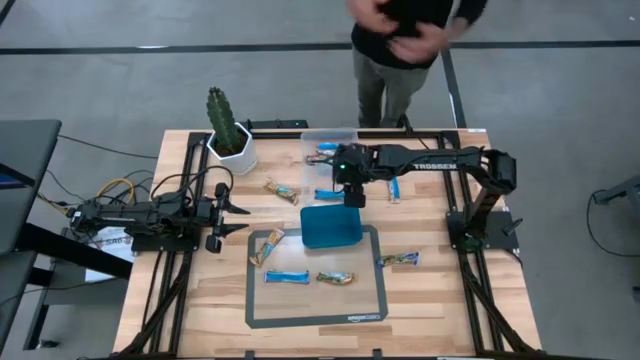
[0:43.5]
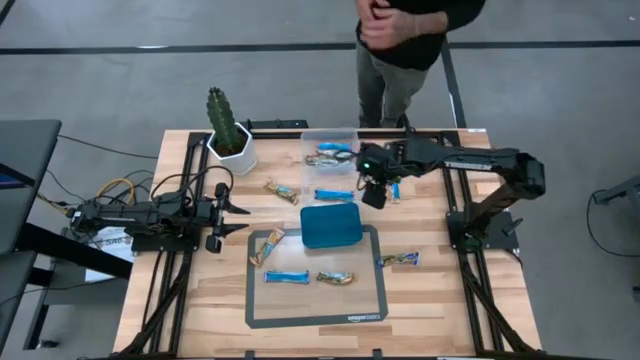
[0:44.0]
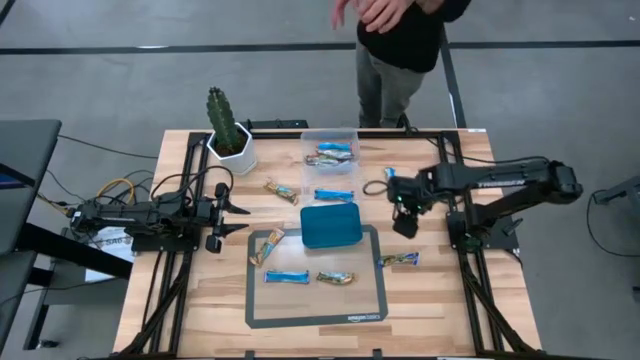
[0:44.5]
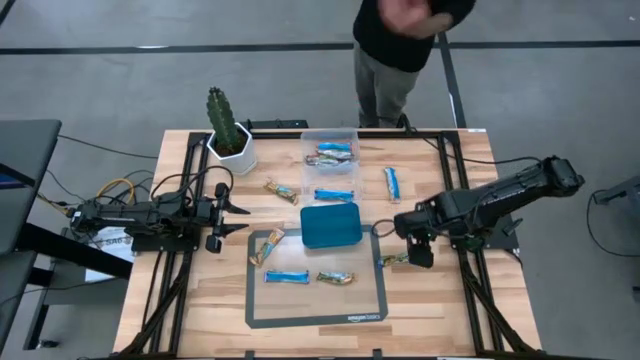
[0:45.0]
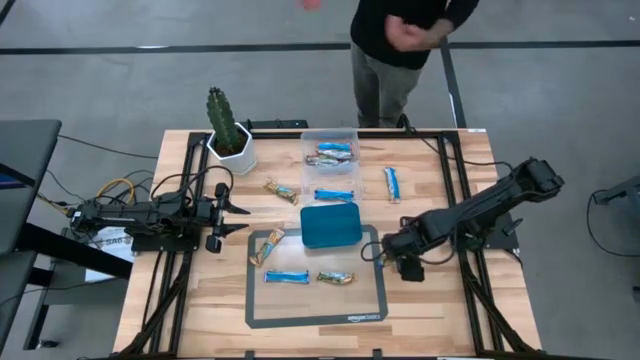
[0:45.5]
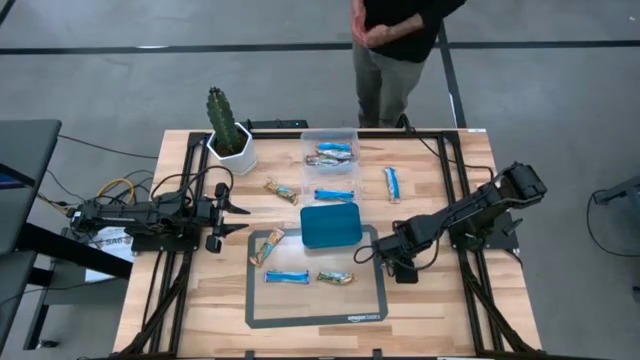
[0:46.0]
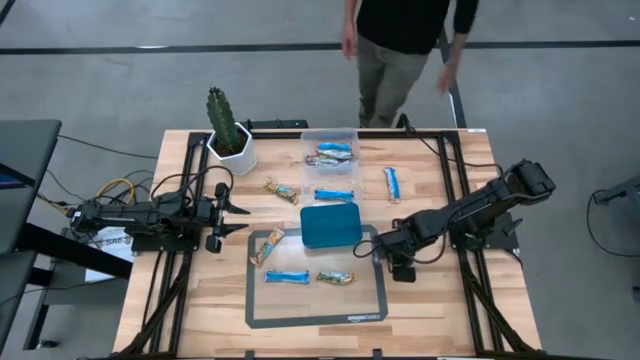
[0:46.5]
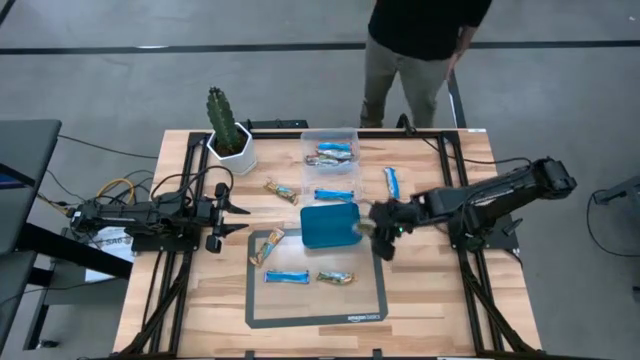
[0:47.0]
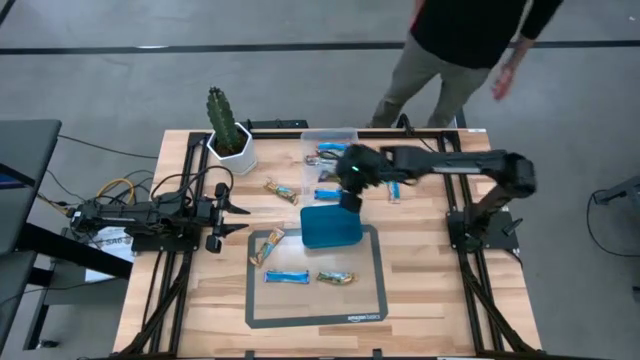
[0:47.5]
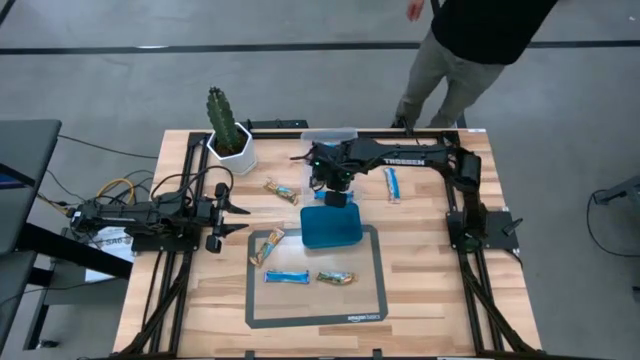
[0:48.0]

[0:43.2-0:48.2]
Task: Pick and place Granola Bars by type
Put the right blue granola bar into the bottom transparent bin

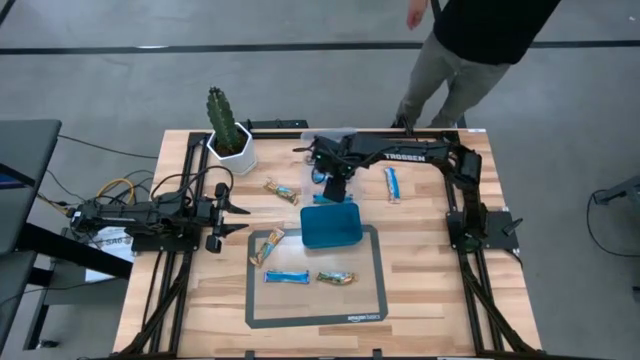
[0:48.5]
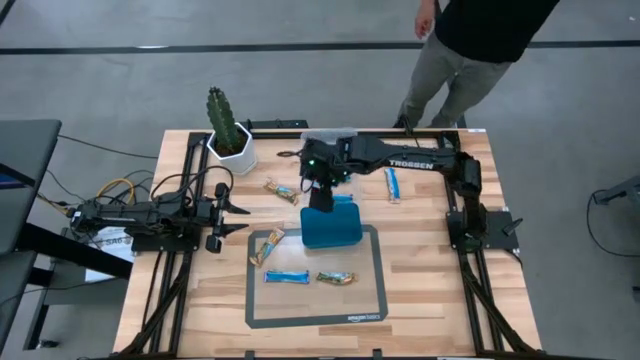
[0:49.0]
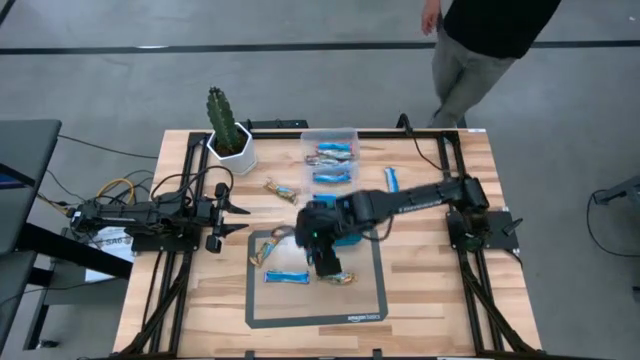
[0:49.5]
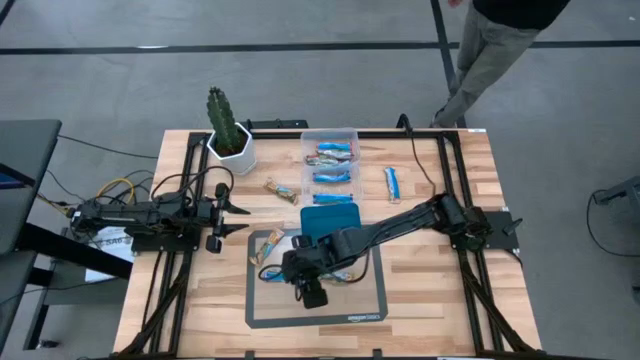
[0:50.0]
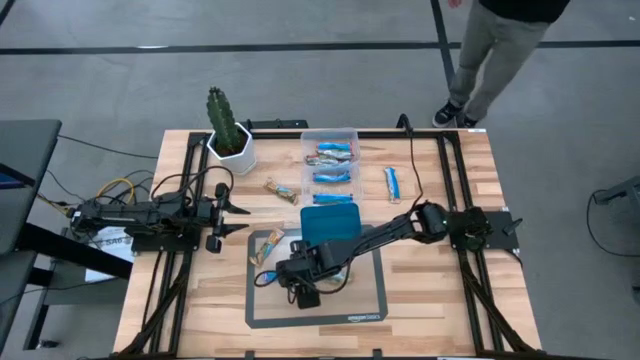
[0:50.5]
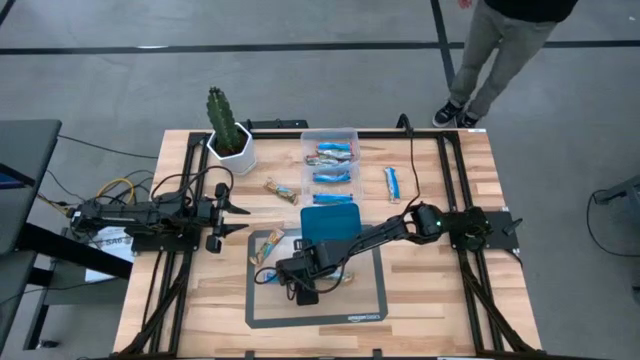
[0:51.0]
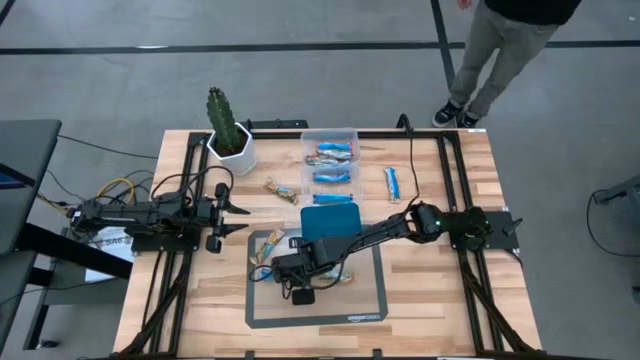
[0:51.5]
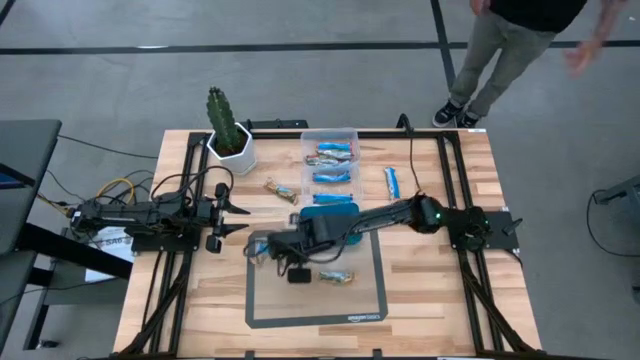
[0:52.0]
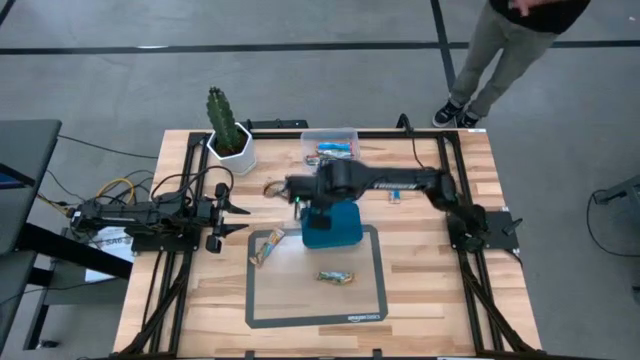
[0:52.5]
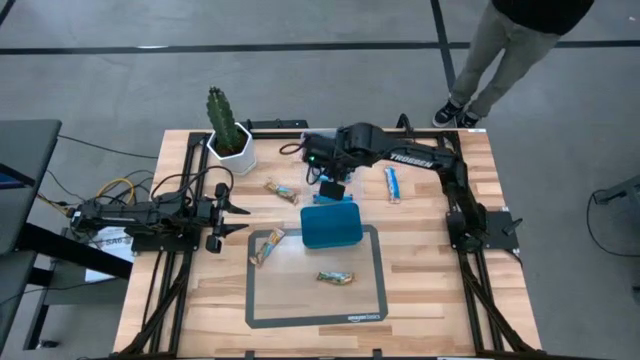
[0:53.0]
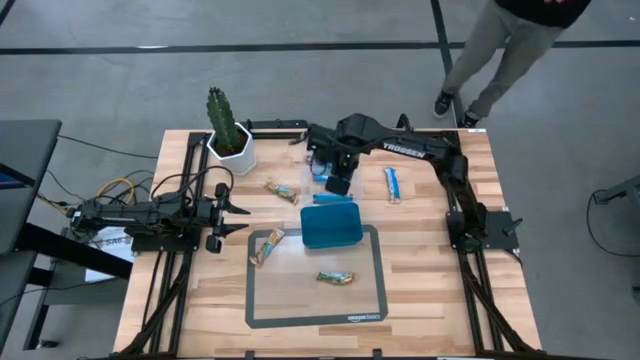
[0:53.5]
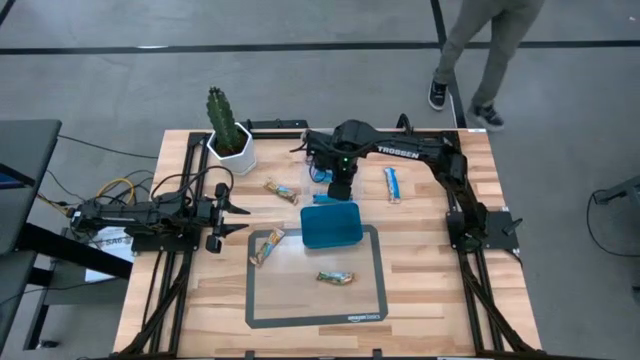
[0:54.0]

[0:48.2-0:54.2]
Put the blue granola bar into the bottom transparent bin

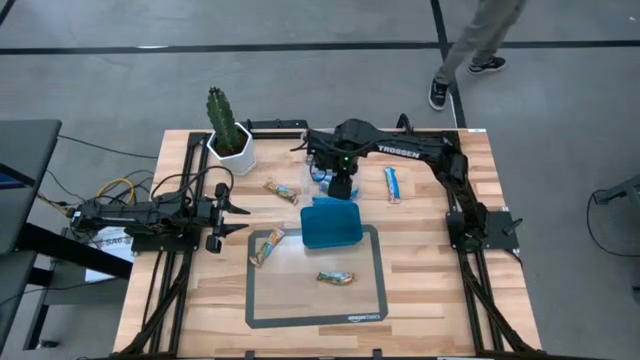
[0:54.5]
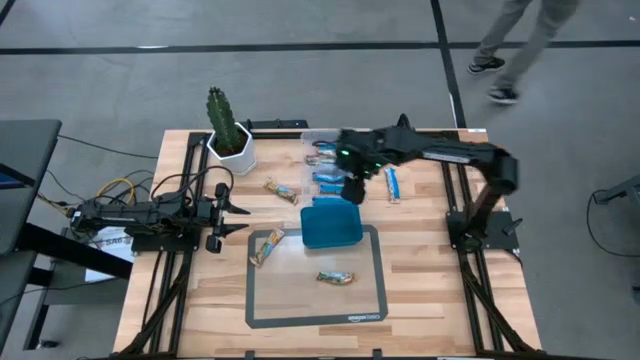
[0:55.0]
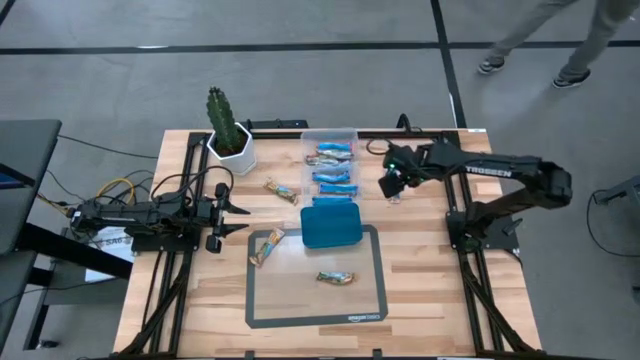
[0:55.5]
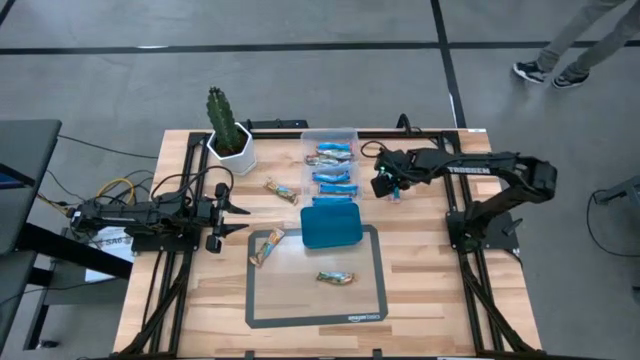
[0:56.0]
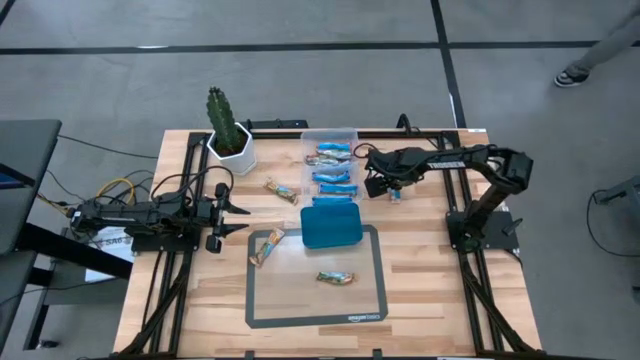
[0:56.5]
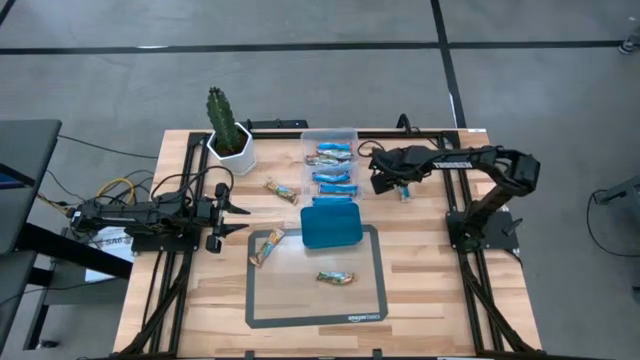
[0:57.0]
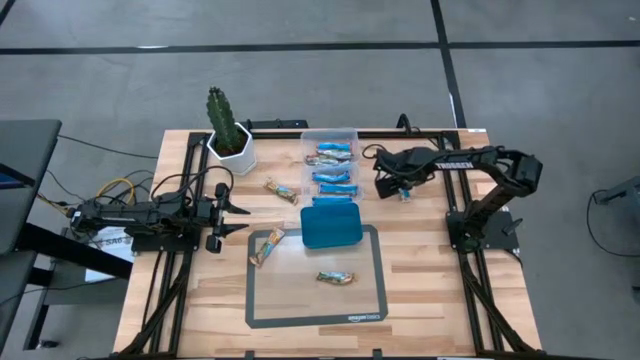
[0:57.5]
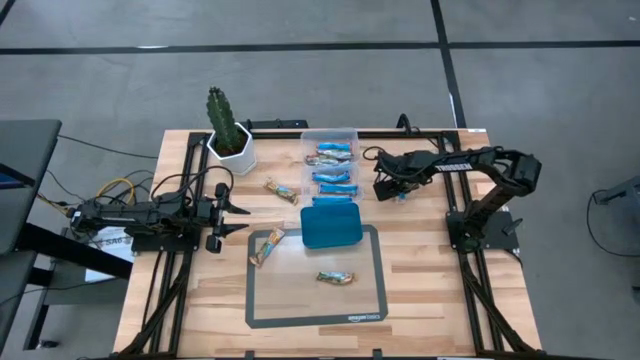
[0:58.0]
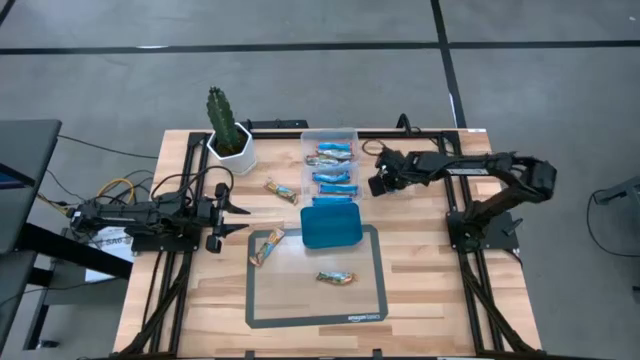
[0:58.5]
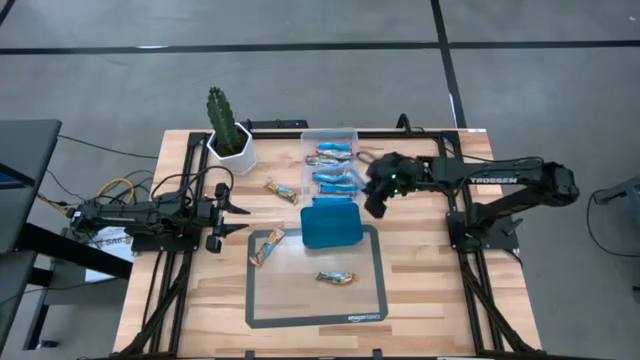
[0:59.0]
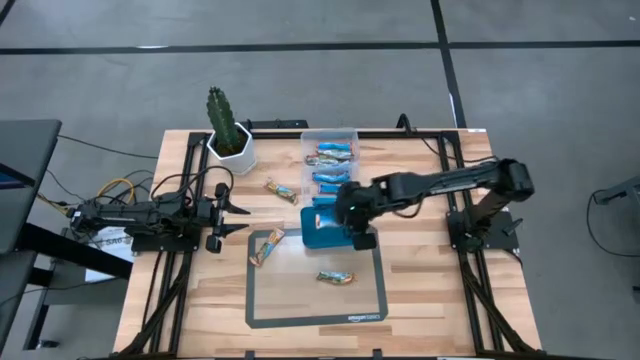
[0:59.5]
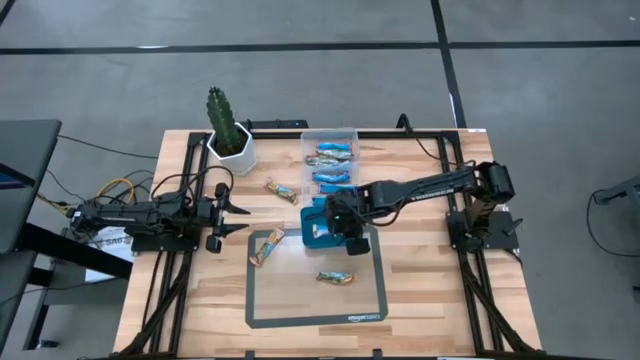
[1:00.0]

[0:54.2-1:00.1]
Put the yellow granola bar into the blue bin

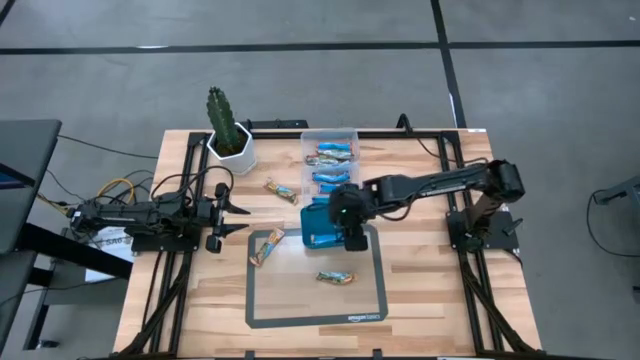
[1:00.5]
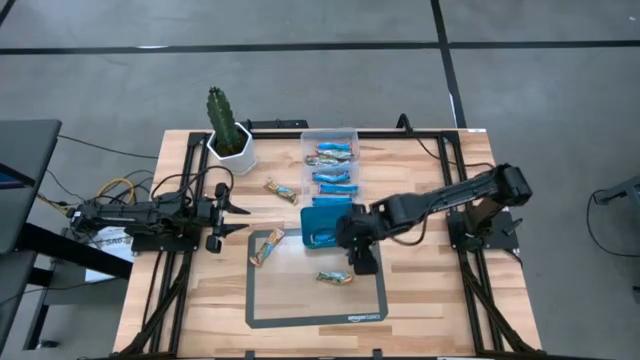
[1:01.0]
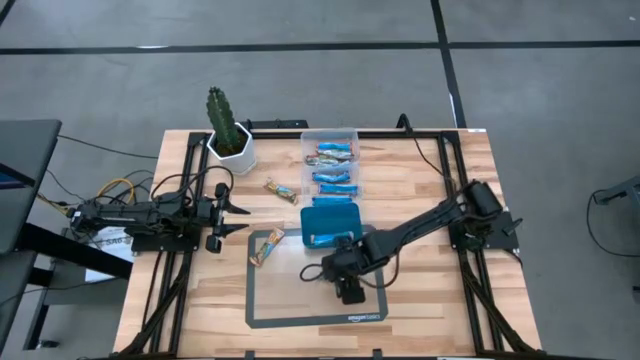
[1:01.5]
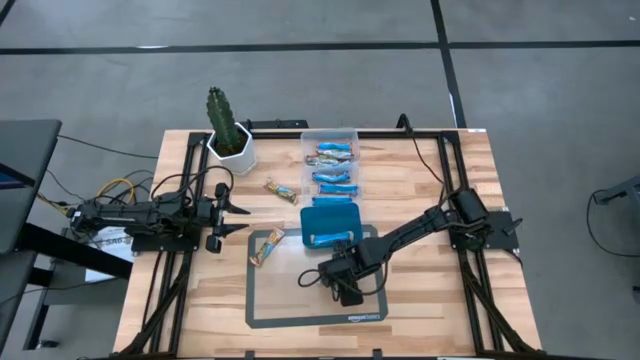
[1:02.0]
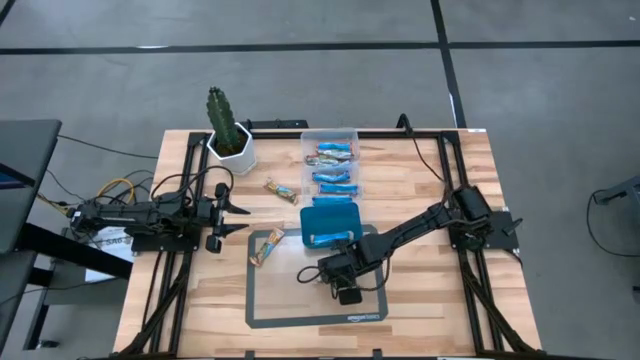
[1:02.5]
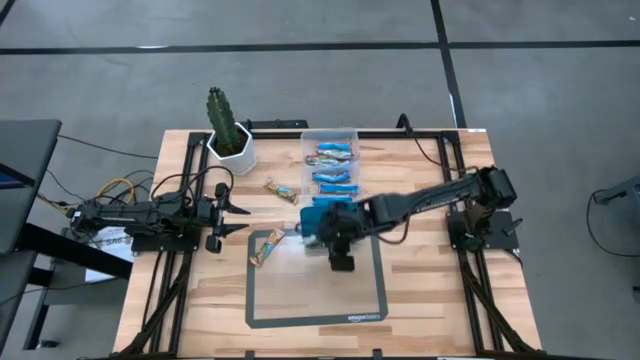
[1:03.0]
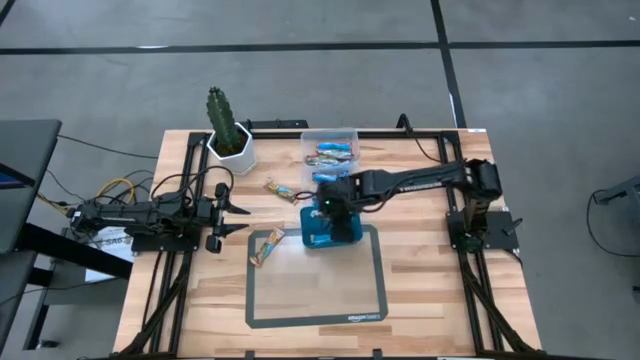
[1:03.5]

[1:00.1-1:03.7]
Put the yellow granola bar into the blue bin

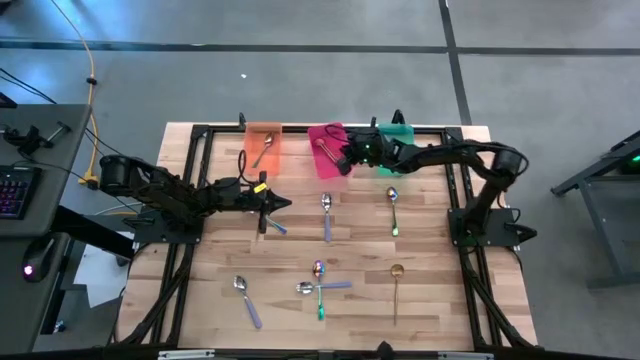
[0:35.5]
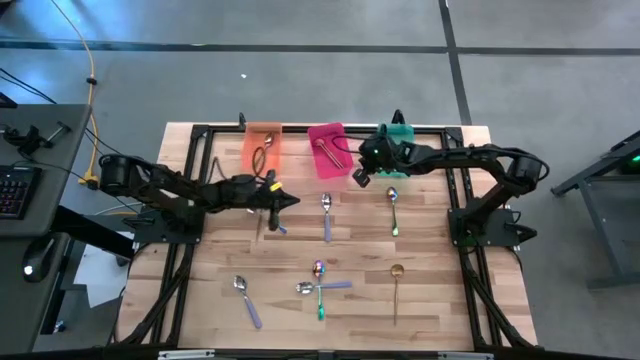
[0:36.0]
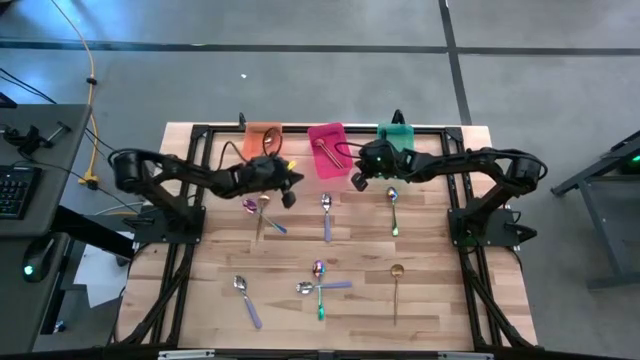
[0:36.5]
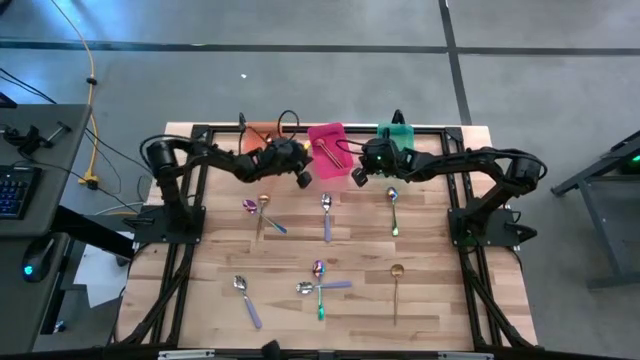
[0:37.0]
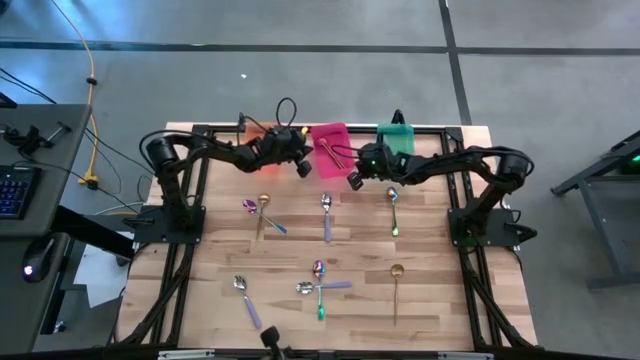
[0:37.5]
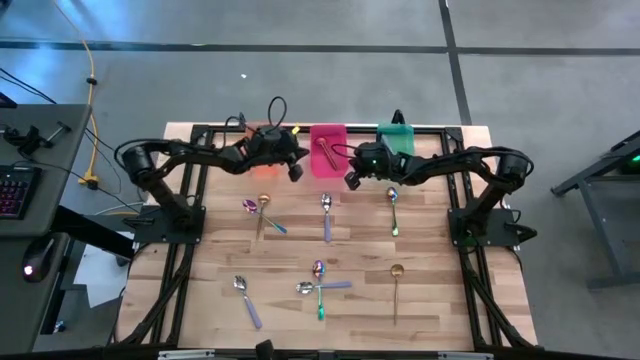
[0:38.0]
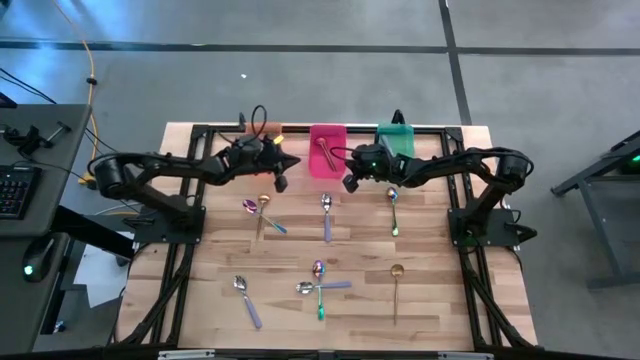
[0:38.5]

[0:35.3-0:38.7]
Task: Sort silverware by color (type)
Adjust the pink bin
